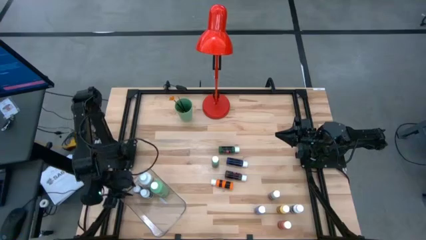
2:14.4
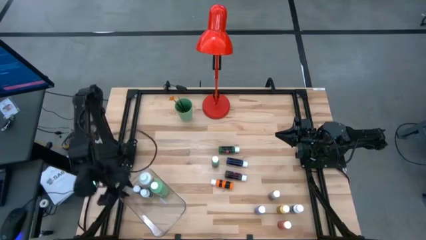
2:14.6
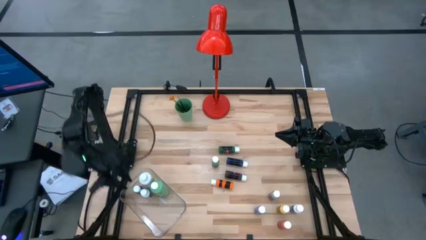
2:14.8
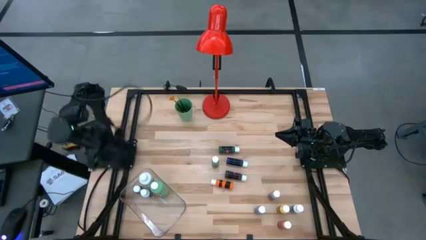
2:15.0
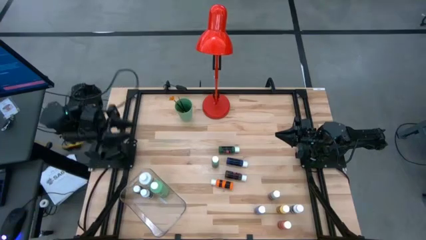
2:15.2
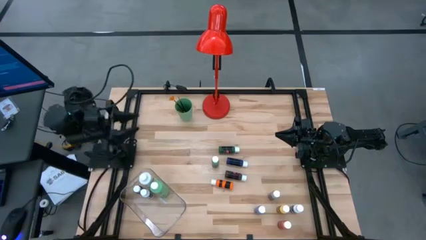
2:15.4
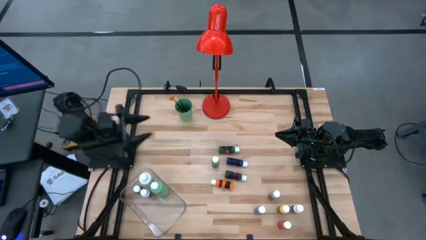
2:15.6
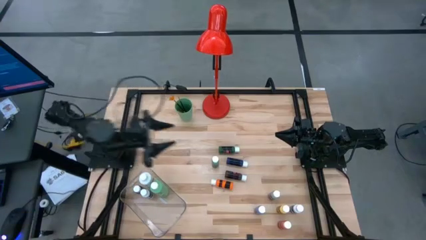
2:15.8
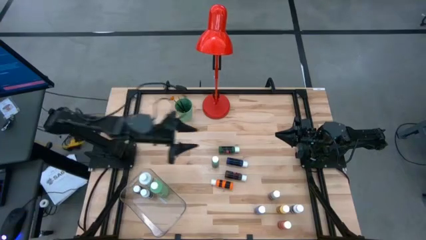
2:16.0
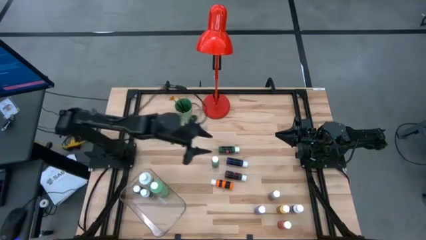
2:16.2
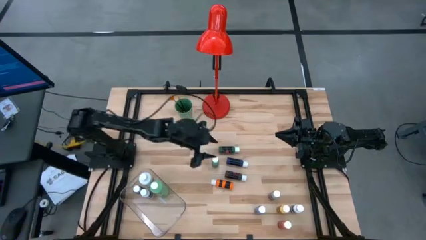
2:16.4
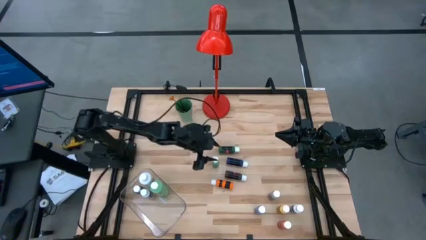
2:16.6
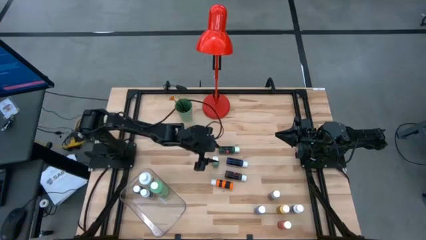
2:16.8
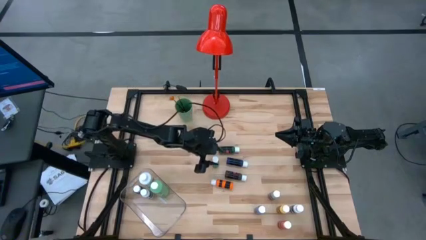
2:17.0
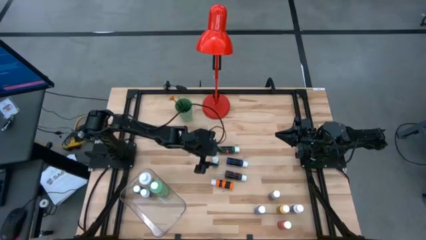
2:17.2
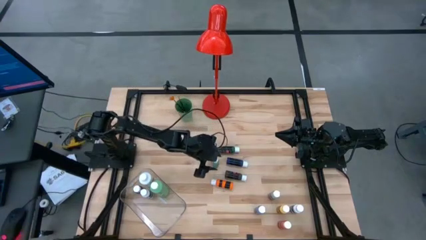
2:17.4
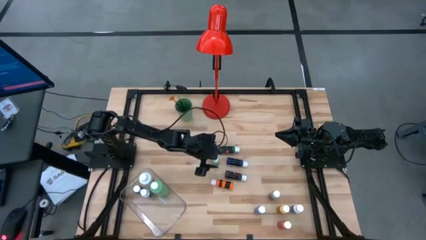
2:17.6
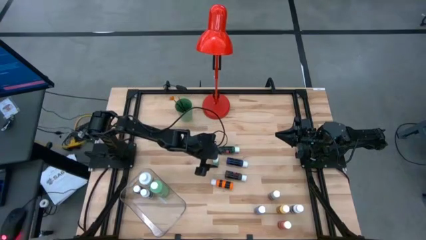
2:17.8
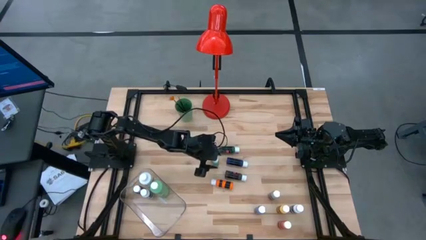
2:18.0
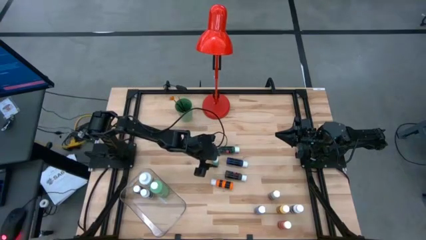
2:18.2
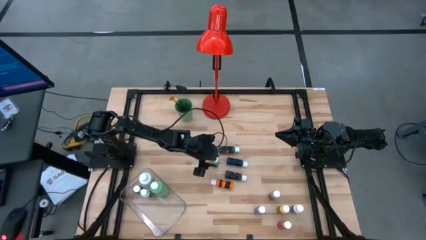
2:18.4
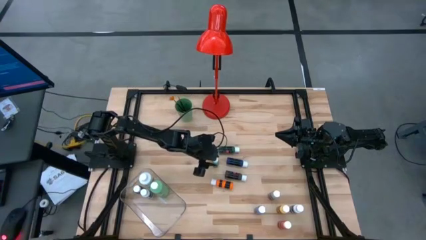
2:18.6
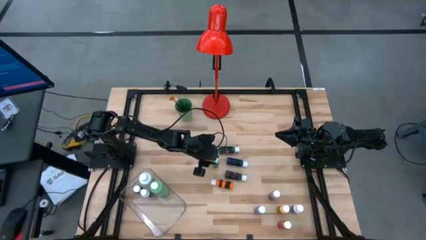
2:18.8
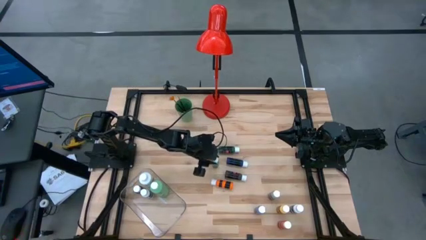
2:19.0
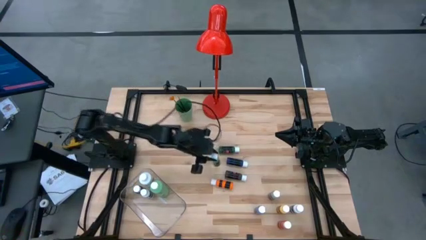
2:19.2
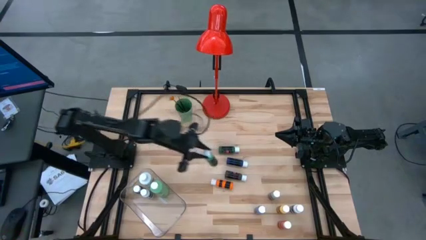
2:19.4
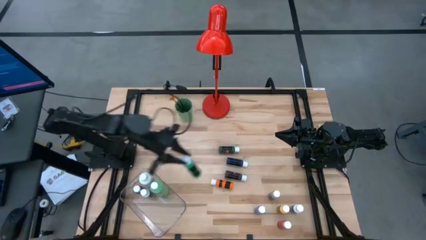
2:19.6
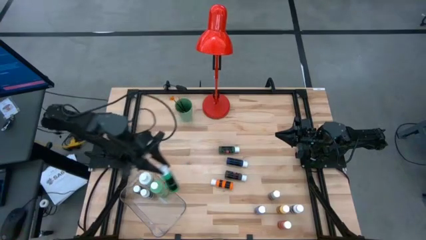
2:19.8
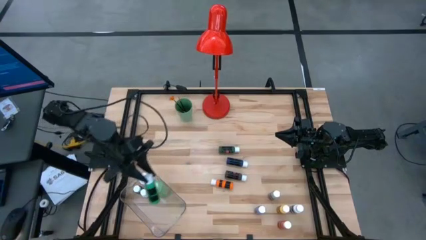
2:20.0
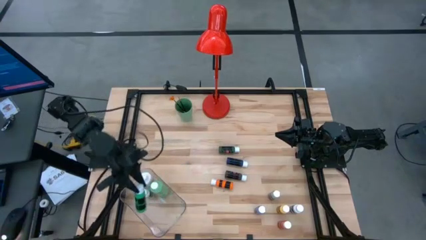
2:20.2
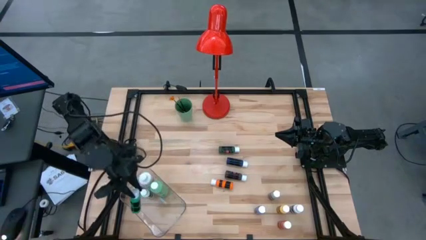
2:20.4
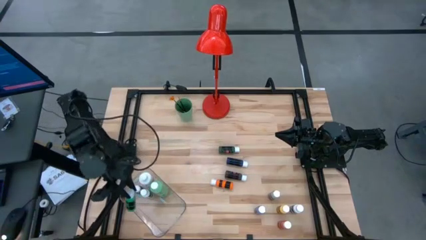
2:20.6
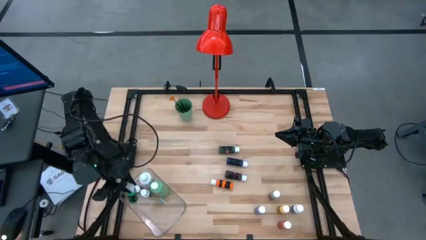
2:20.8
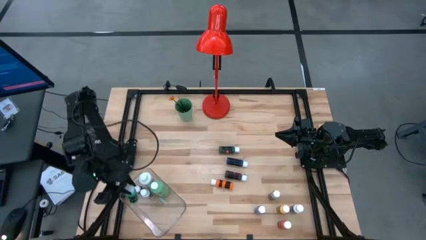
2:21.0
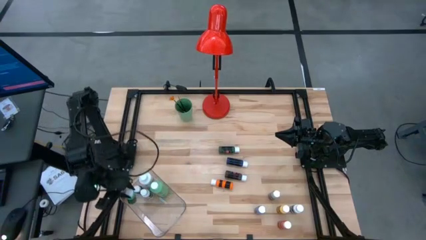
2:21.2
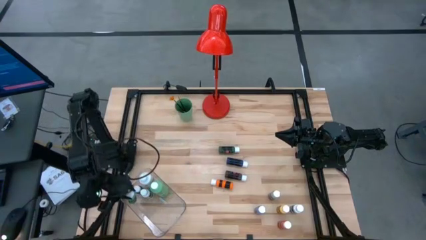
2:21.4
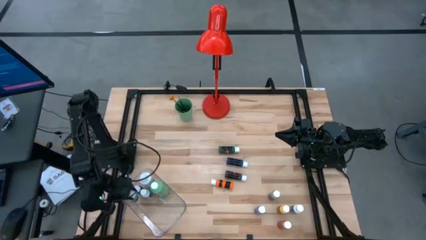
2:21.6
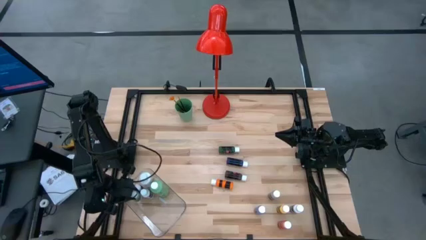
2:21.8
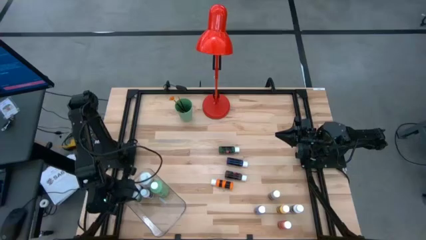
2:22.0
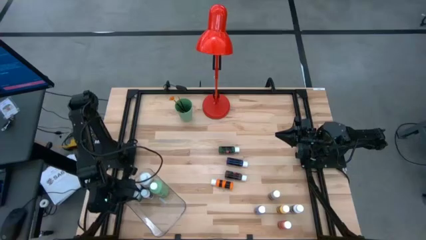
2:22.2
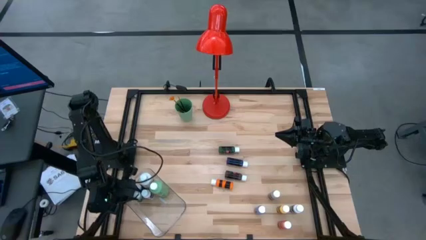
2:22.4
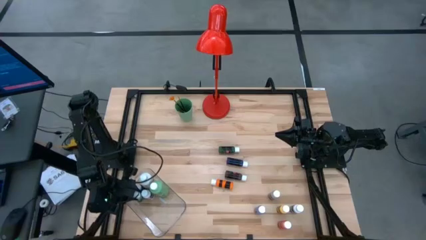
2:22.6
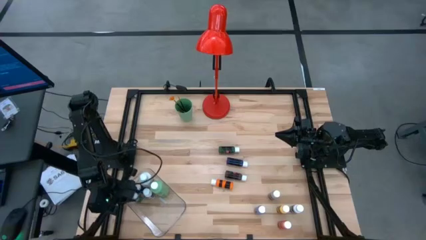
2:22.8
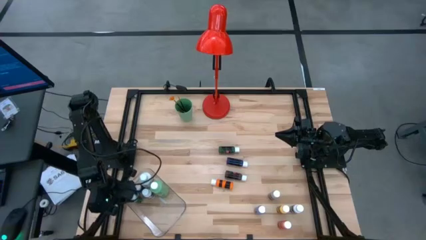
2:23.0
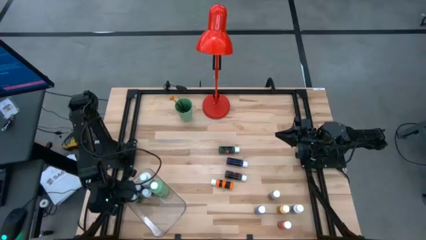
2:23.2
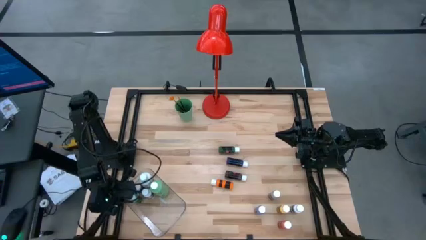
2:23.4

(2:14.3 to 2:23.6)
Task: Pick & Place Paint Supplies
Put the green coloring bottle into the transparent bin

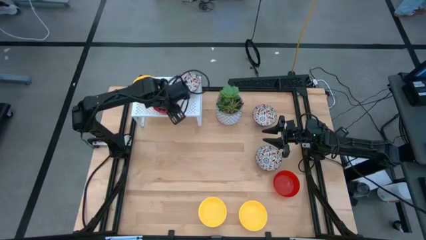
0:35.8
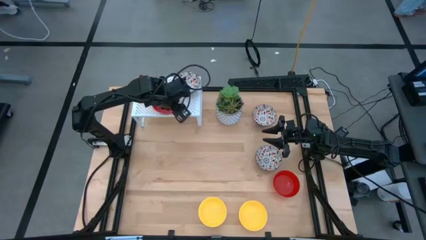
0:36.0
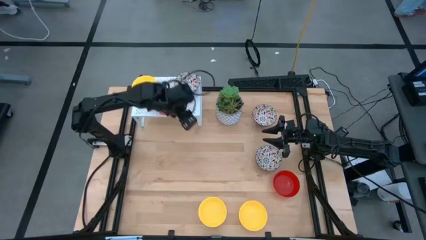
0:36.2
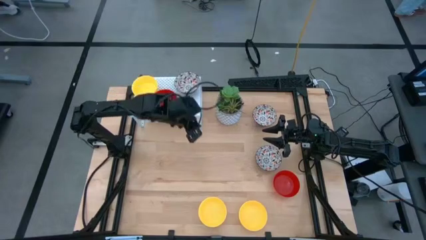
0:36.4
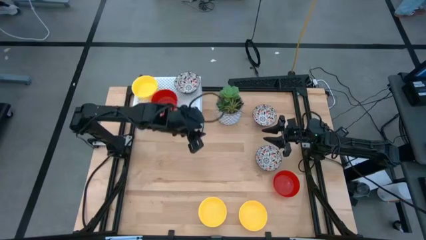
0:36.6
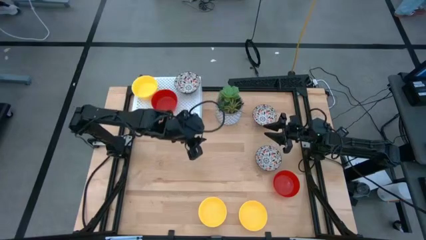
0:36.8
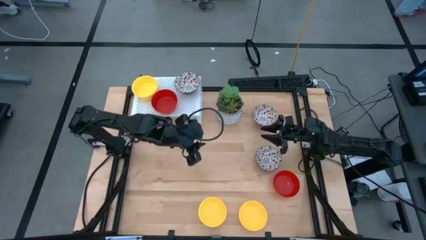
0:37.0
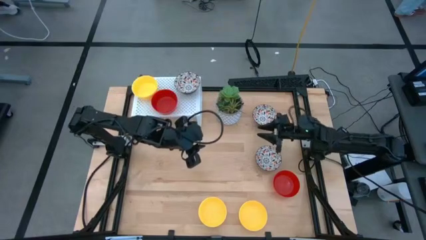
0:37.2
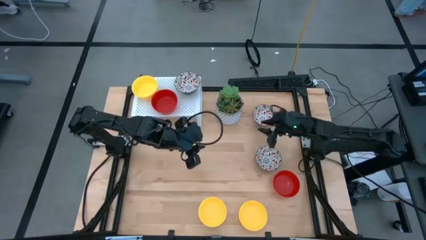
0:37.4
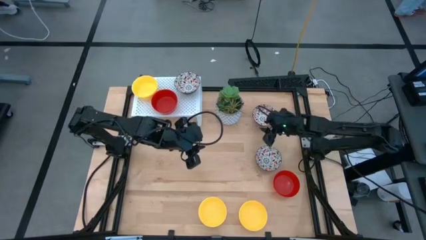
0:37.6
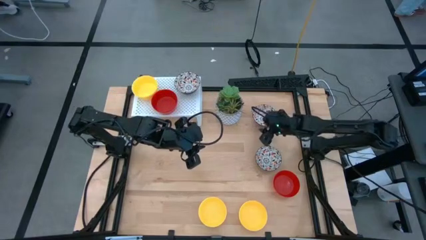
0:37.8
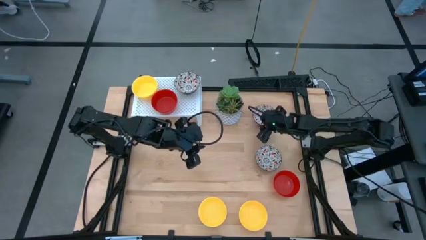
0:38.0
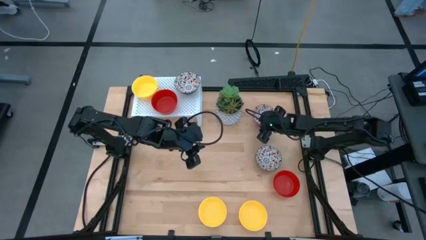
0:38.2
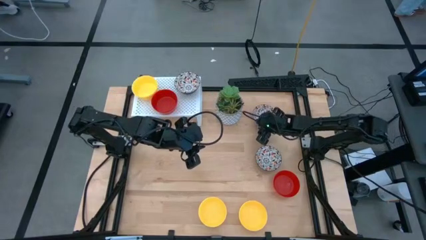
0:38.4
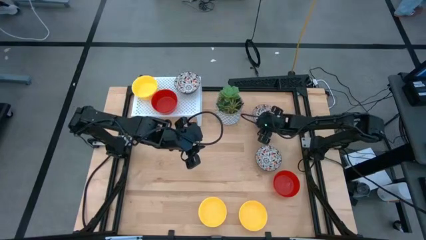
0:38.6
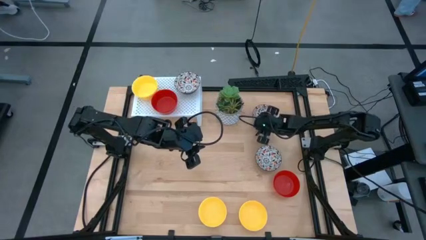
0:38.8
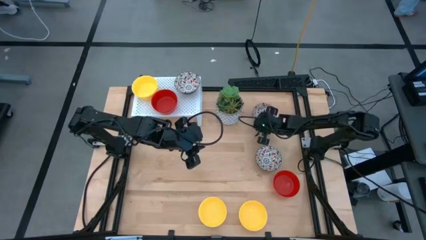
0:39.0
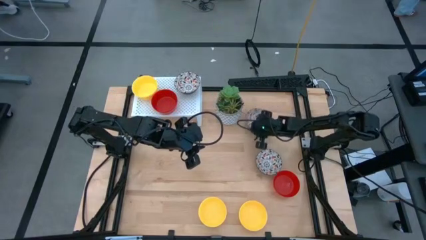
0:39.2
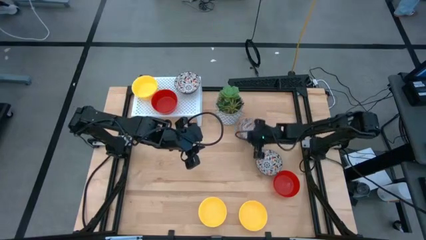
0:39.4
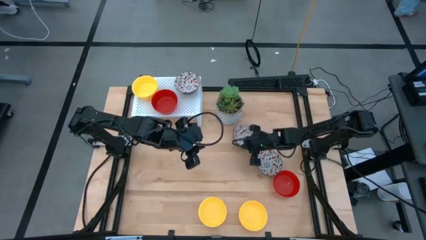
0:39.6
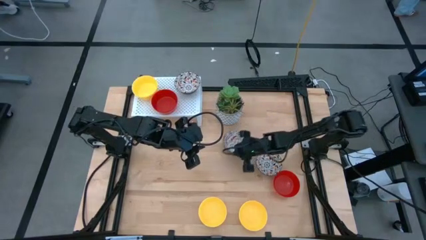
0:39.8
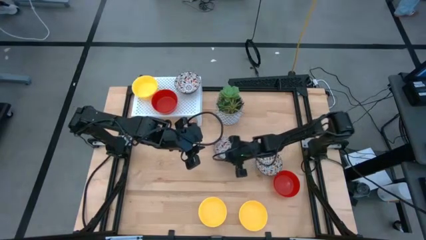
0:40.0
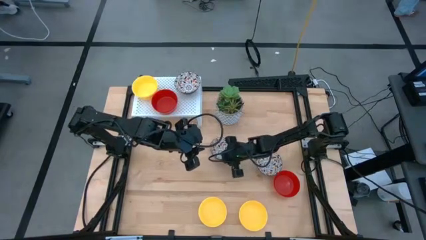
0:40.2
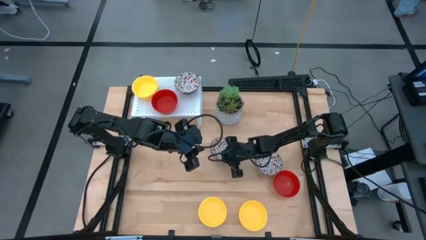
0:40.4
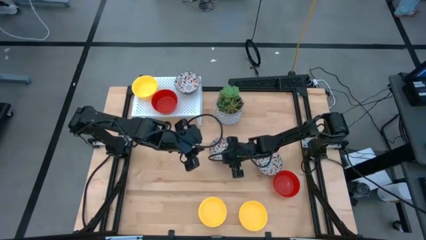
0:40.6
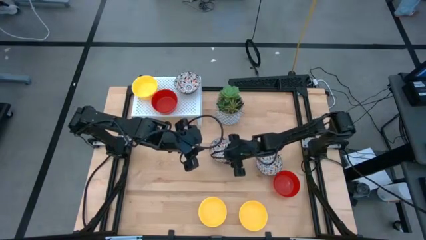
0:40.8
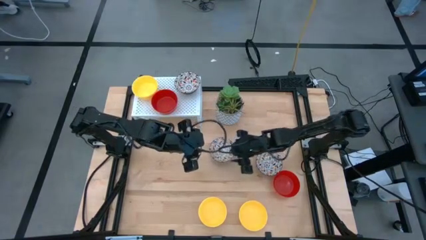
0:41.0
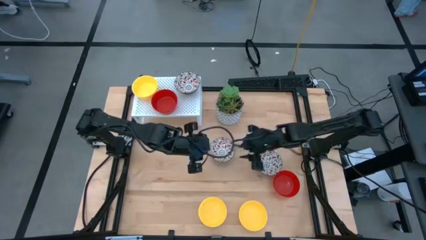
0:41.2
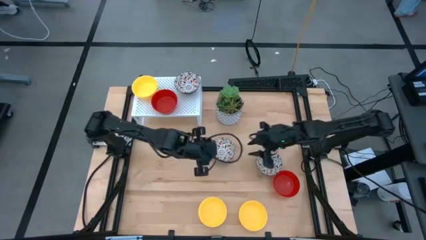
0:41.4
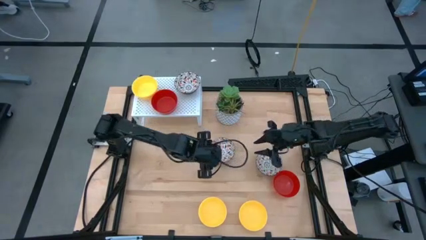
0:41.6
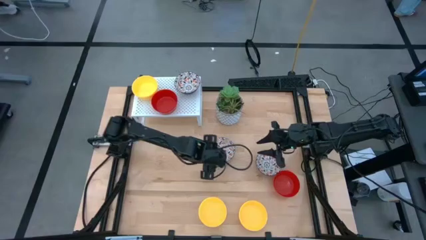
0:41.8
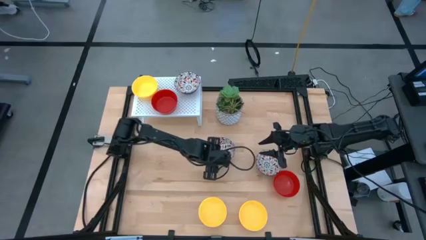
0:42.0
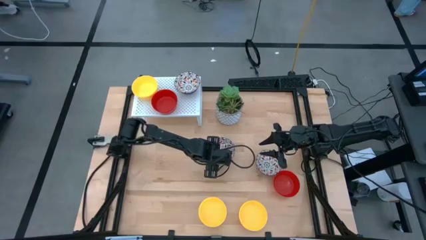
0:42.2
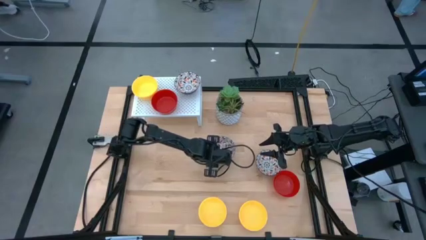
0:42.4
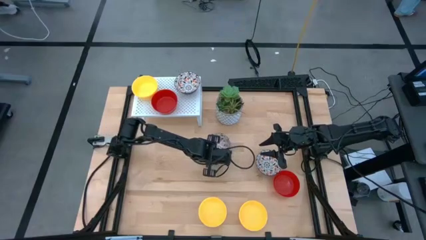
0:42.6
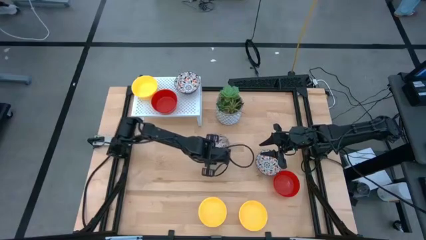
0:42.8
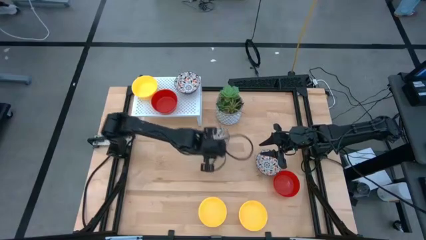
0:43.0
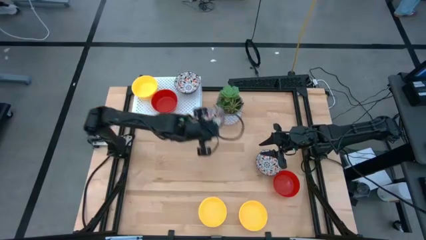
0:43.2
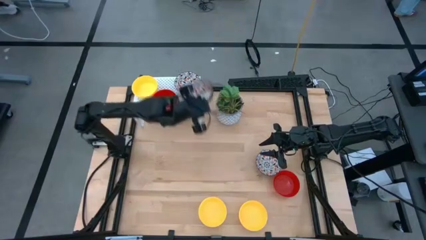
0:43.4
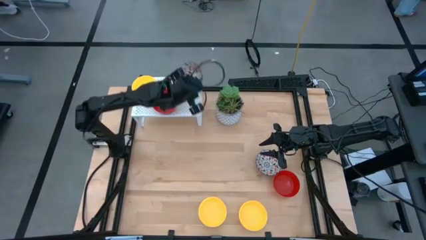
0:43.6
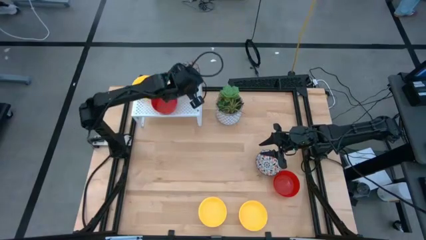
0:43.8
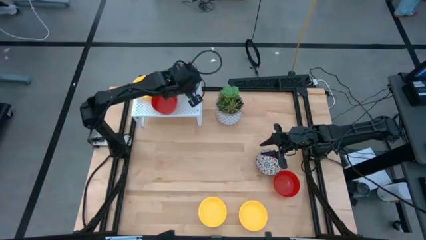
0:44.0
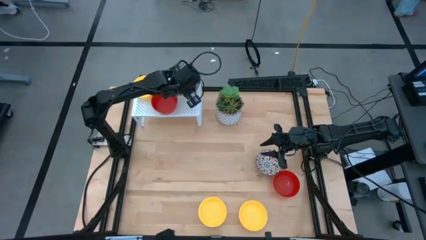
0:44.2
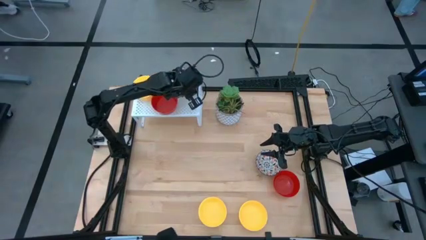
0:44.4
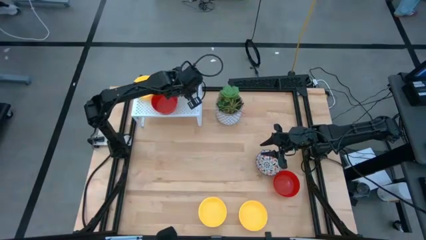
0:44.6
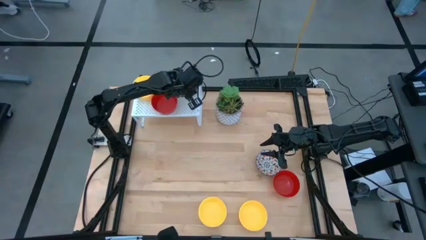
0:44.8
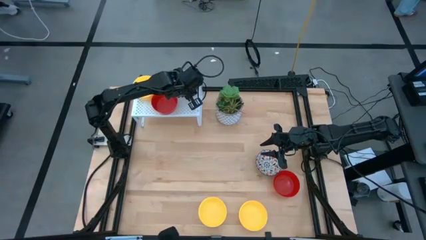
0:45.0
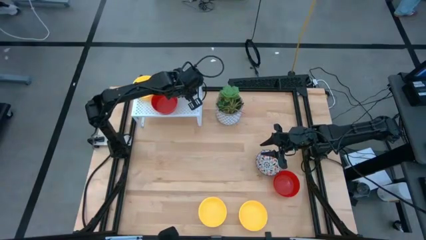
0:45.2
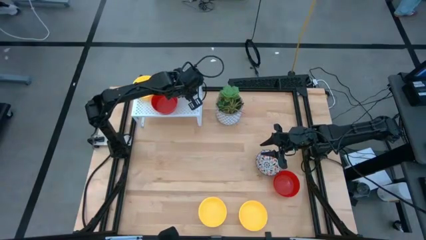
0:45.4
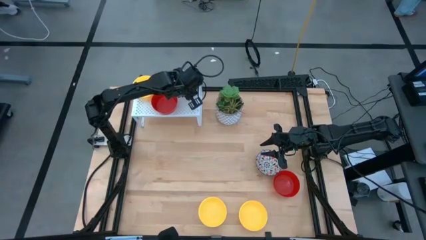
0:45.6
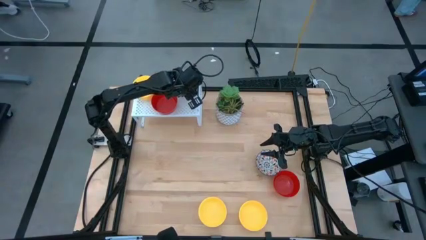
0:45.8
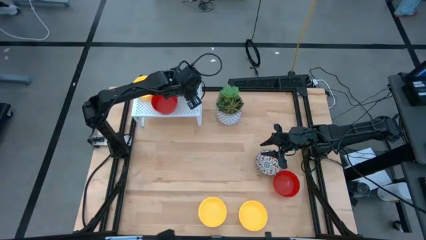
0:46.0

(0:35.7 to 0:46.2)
Task: Pick & Place Mini bowls
Stack the patterned bowl on top of the other patterned bowl on the shelf
